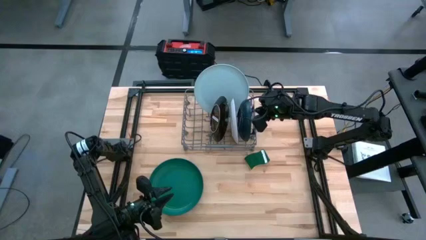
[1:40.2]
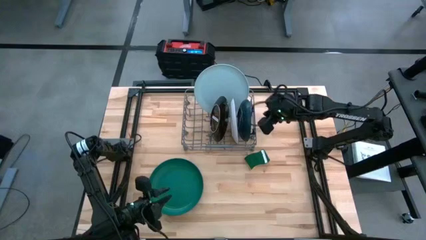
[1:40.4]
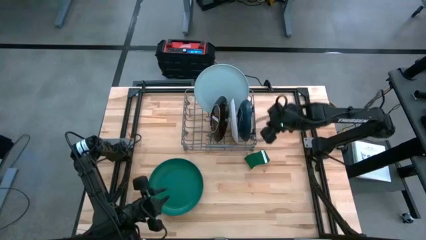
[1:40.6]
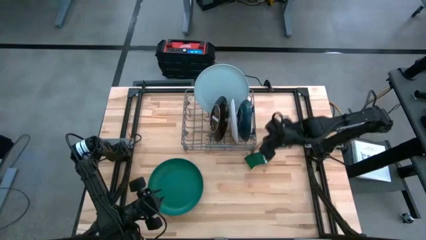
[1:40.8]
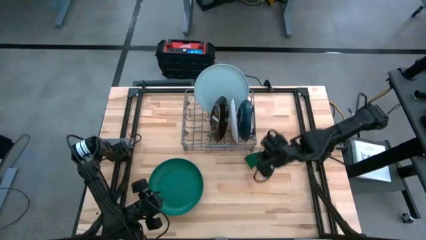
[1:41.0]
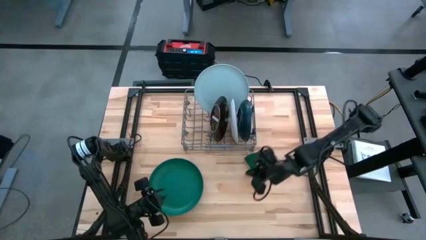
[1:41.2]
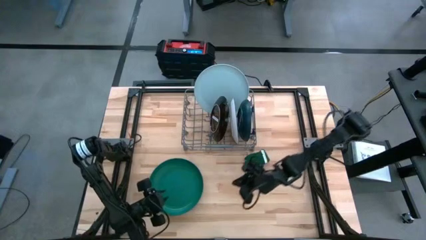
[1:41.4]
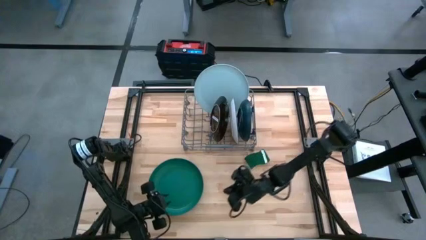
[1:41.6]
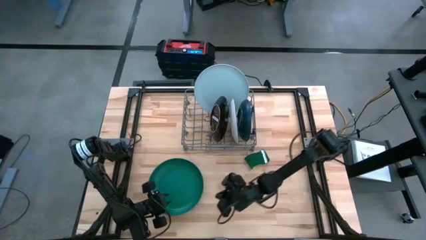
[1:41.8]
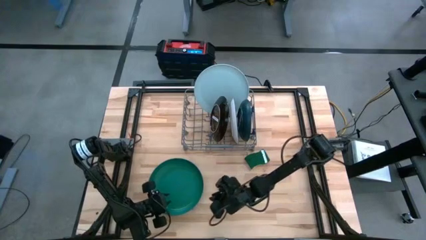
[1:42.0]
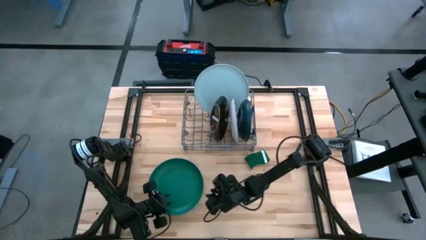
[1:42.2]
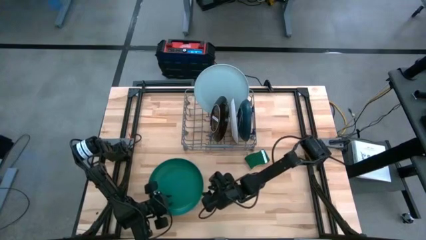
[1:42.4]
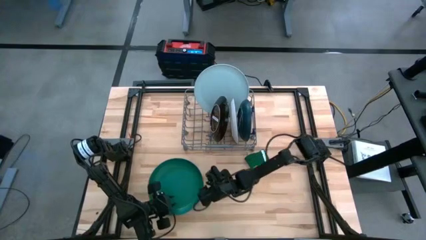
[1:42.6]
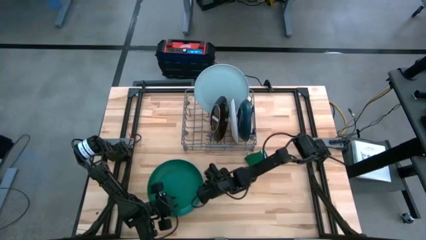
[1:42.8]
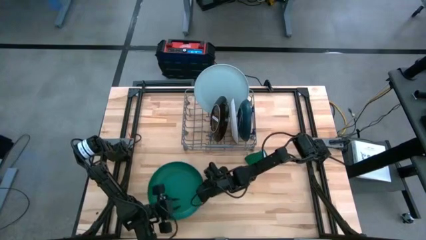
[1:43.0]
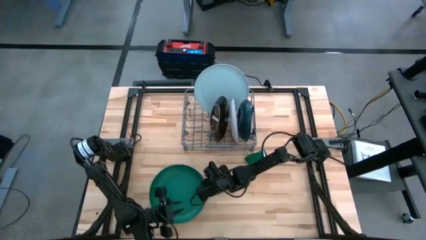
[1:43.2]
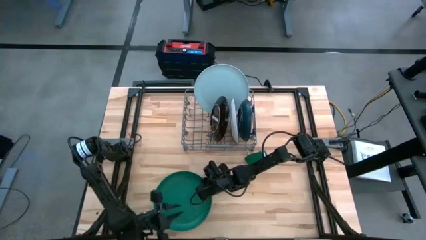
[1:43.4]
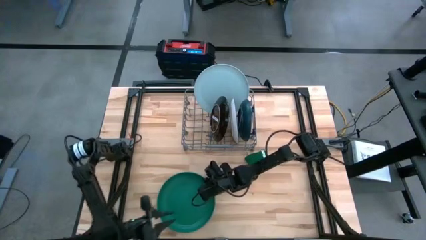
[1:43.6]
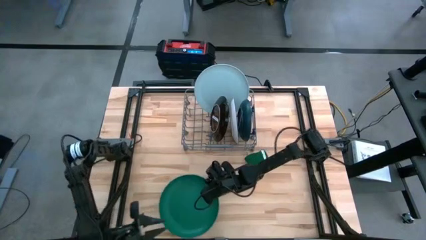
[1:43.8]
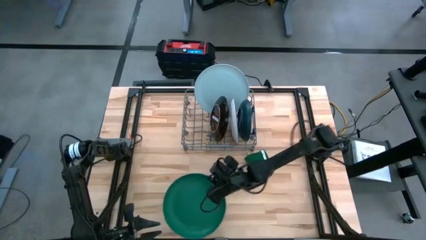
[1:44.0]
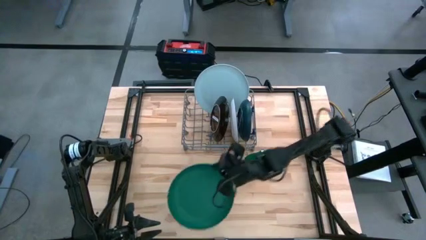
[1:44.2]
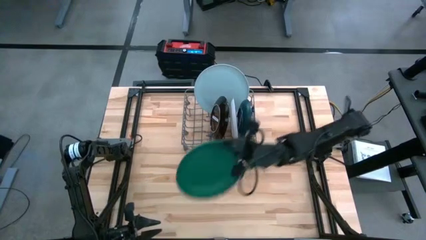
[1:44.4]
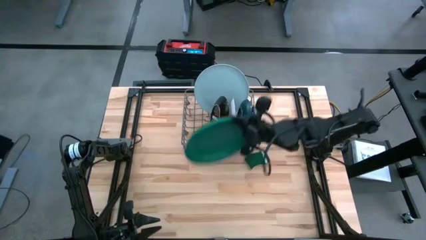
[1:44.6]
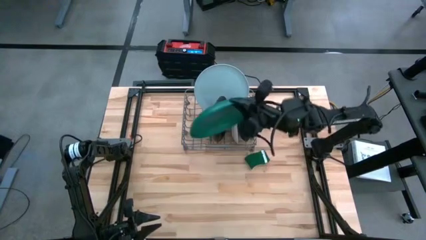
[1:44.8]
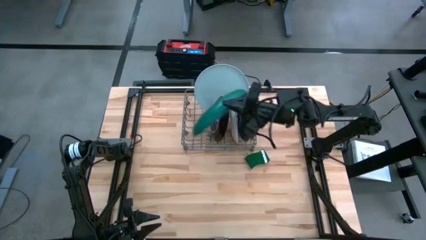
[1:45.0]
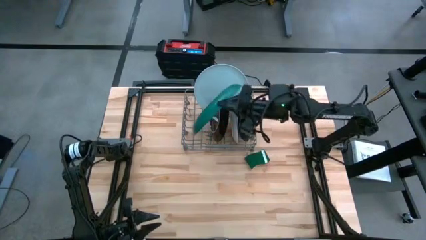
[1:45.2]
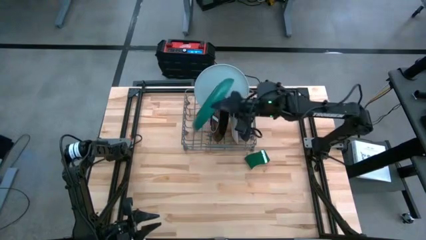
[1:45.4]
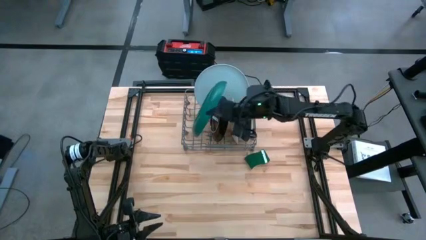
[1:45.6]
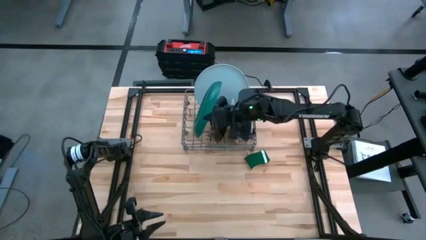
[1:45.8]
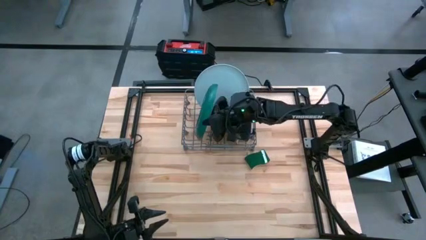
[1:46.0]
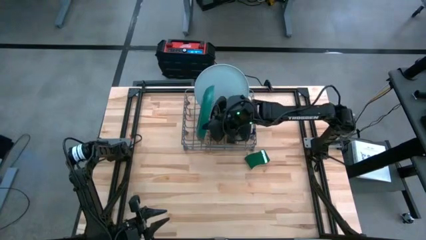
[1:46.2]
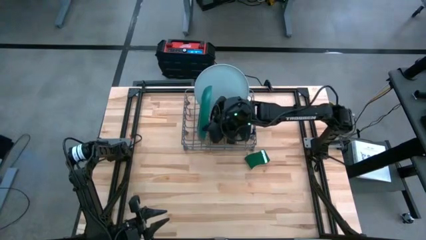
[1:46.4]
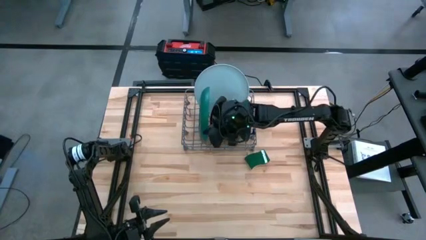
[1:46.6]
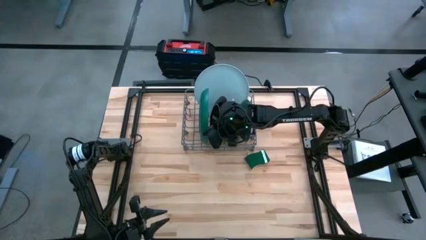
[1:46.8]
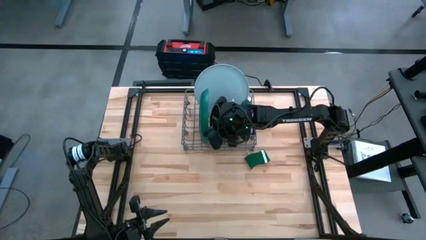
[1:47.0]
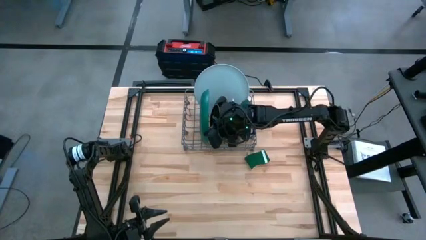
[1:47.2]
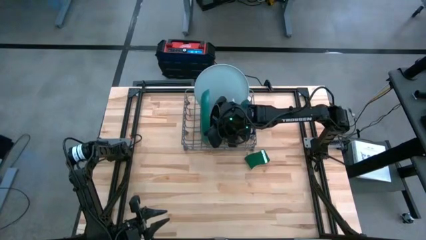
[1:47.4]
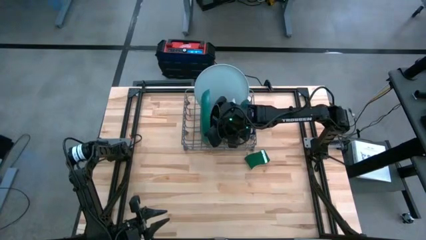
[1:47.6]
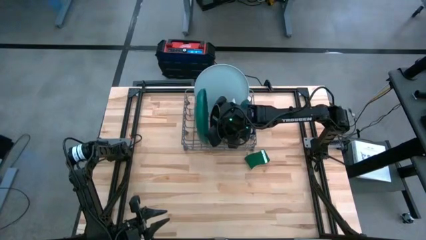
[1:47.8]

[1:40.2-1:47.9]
Task: Sort dishes
Put the green plate in the dish rack

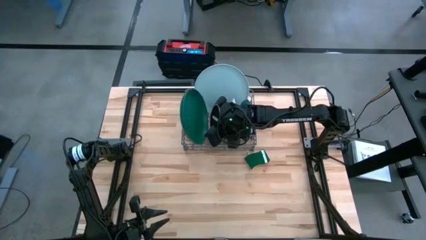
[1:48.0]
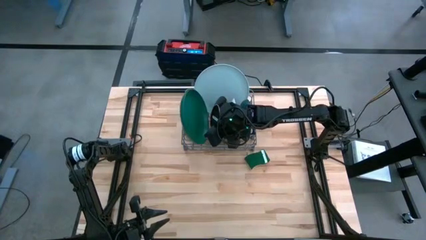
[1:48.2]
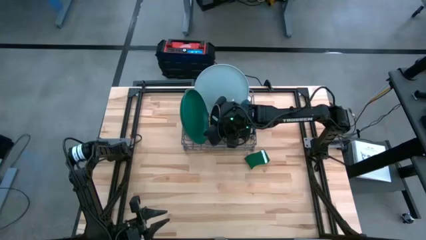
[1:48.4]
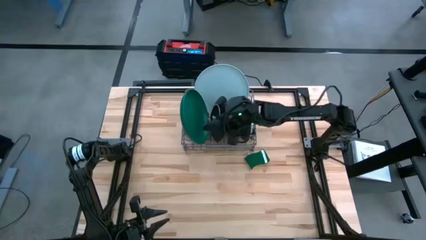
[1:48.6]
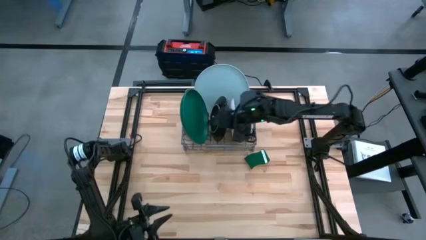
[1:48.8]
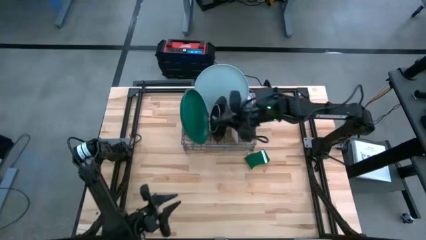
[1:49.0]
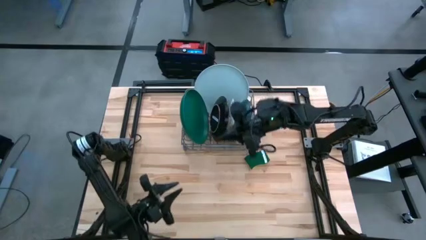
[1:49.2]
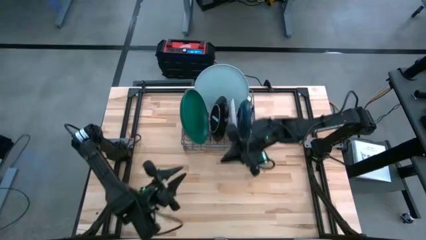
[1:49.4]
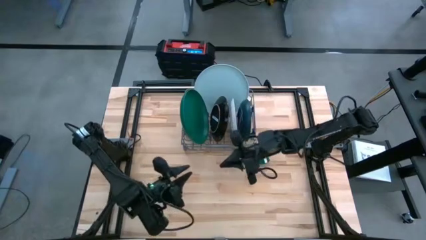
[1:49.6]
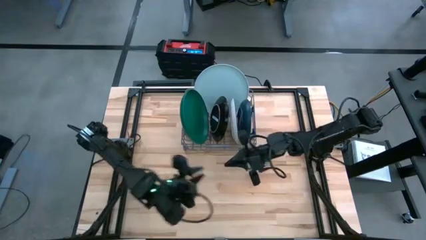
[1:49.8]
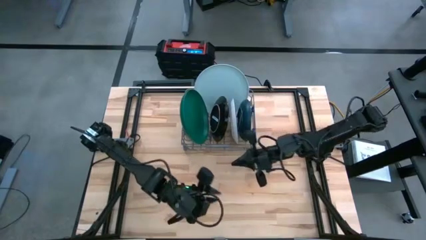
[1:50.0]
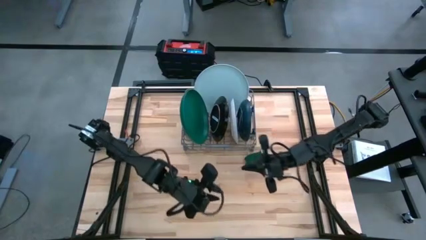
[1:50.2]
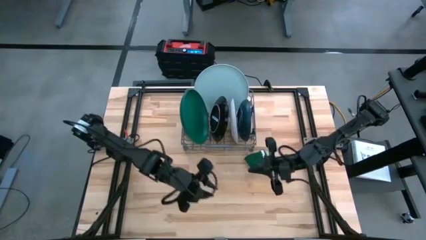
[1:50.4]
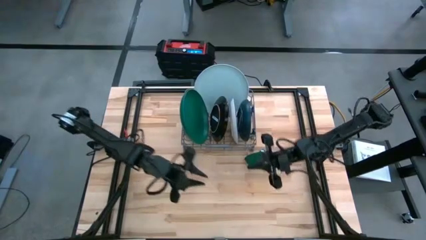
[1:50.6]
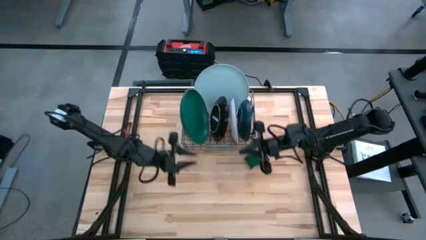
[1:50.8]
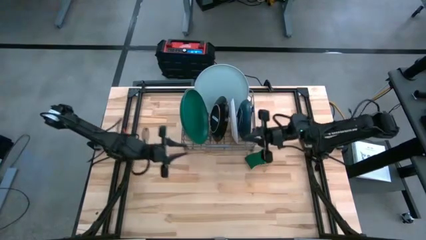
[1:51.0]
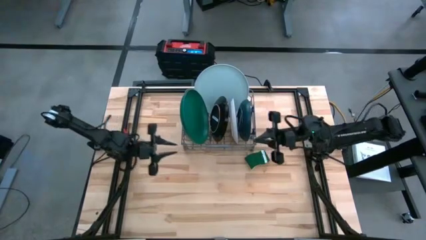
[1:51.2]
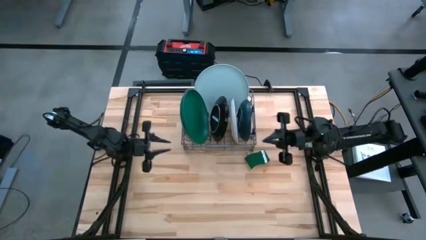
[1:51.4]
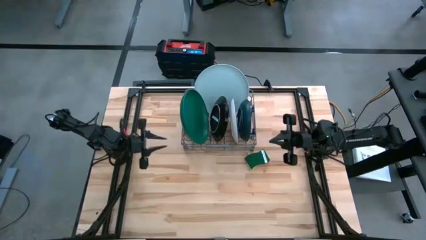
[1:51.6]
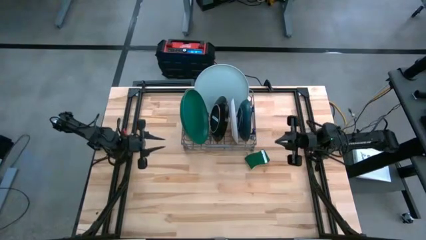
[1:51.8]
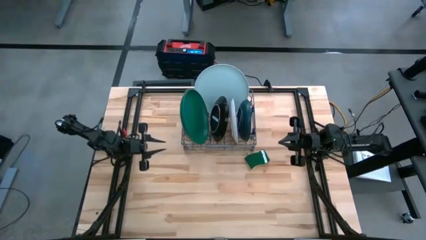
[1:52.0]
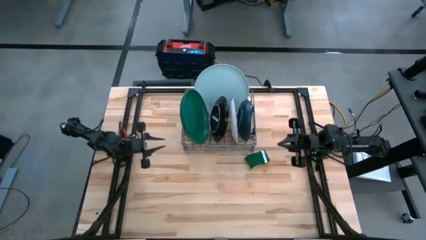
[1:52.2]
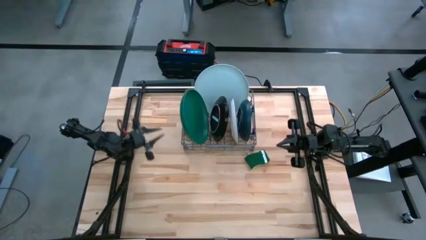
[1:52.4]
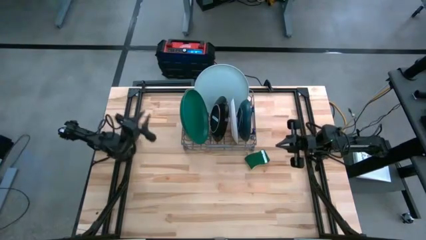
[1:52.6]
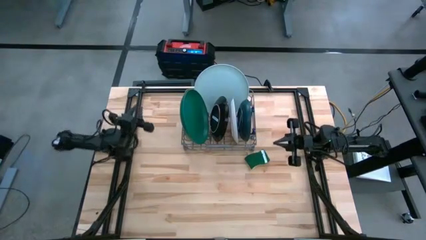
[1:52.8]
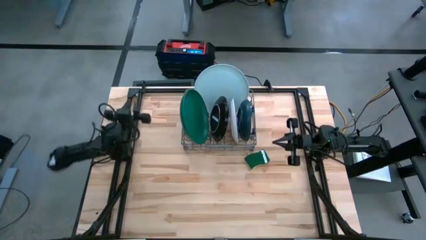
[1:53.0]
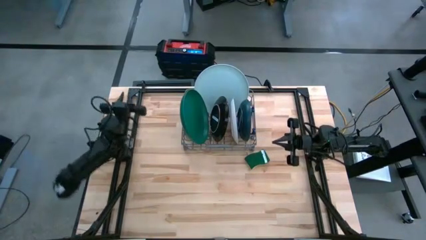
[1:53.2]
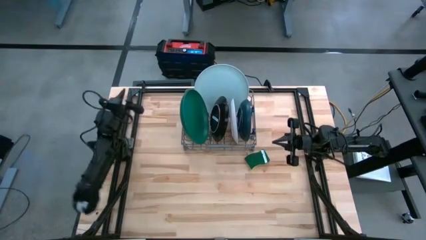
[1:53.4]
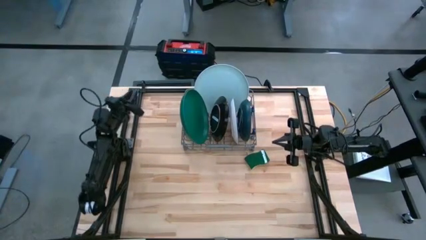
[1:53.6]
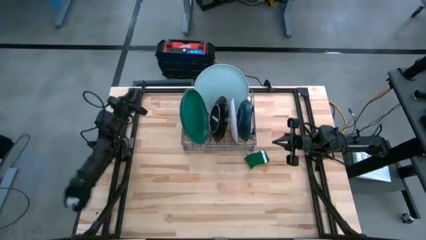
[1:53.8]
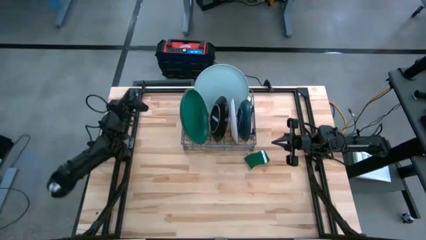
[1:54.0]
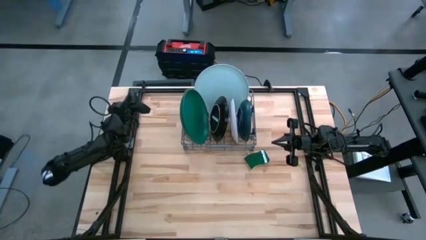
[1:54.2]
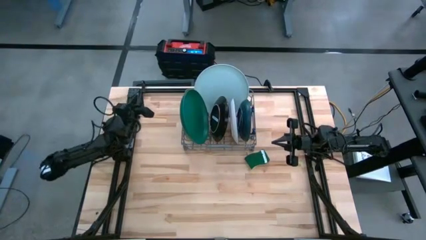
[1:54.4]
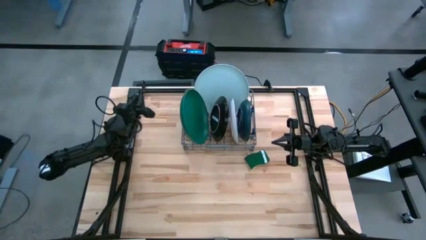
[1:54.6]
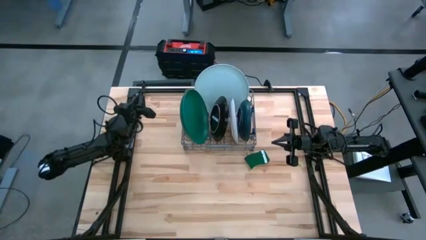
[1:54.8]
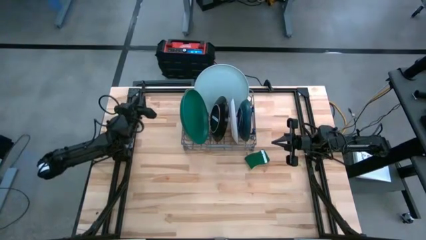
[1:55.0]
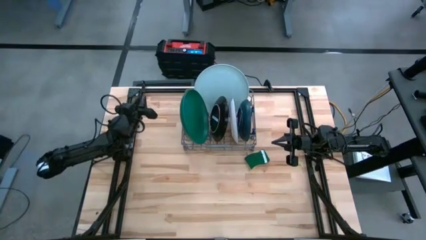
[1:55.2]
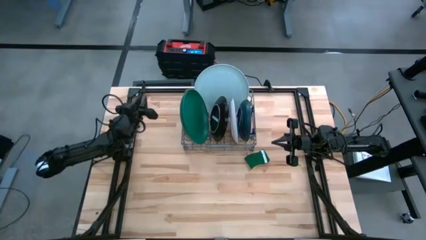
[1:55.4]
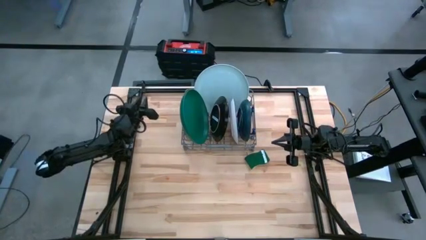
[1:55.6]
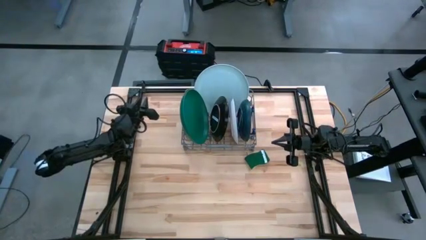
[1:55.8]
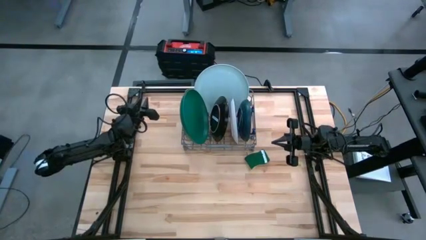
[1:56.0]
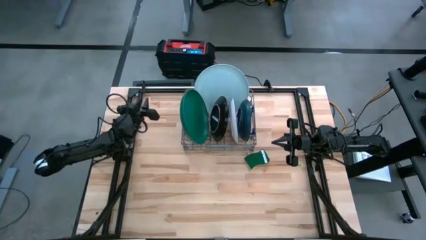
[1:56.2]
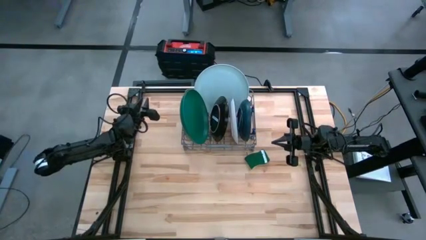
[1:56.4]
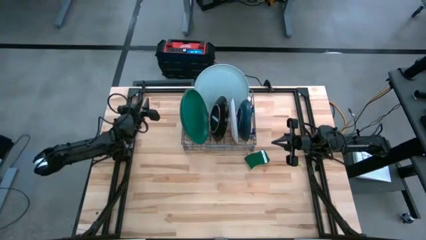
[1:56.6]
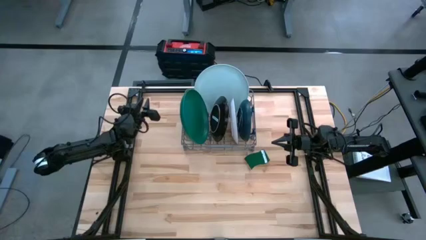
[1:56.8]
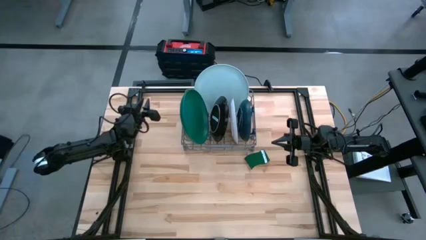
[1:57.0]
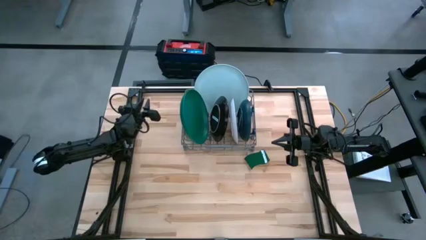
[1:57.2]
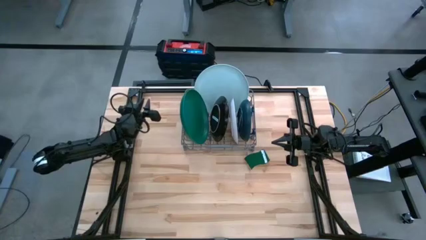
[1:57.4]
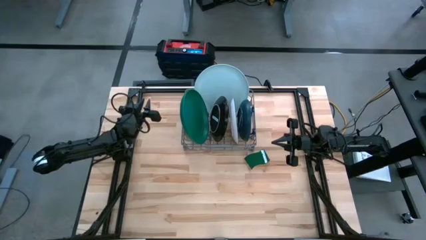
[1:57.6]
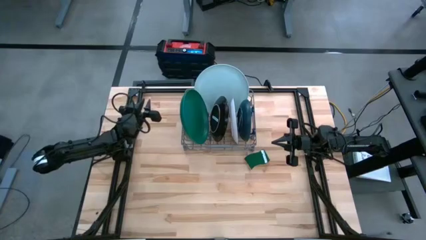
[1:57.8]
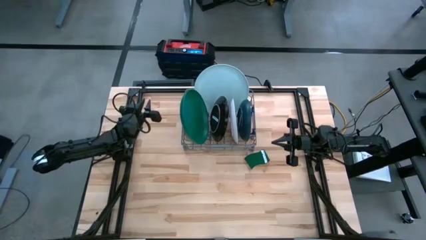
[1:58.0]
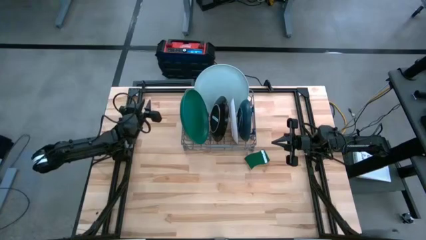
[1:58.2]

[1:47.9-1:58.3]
Return to Home Position
